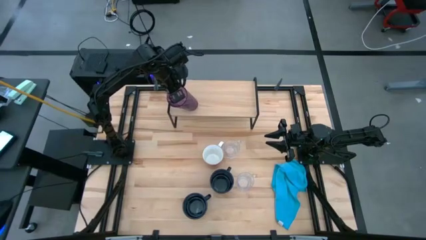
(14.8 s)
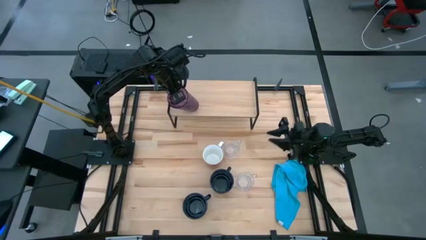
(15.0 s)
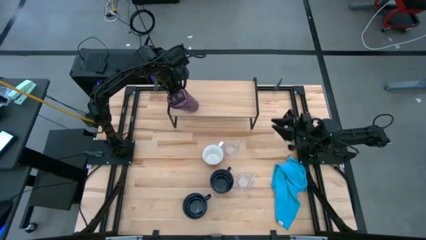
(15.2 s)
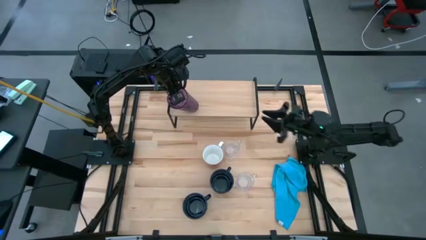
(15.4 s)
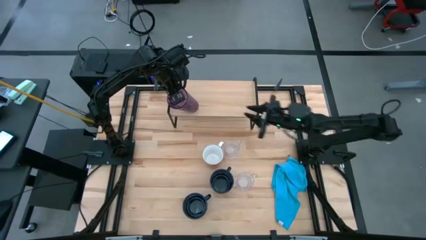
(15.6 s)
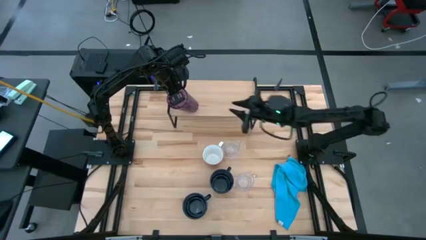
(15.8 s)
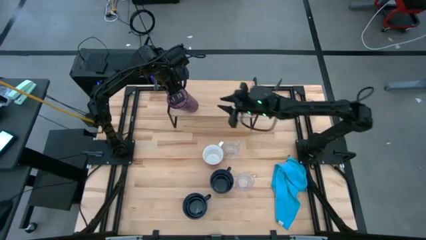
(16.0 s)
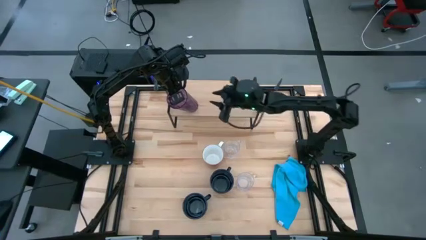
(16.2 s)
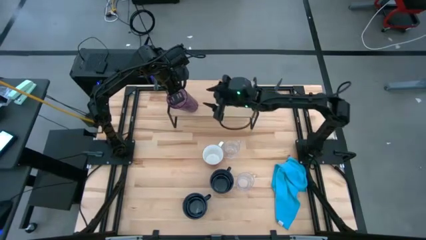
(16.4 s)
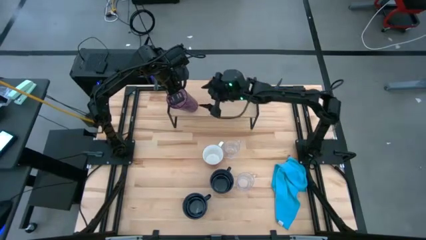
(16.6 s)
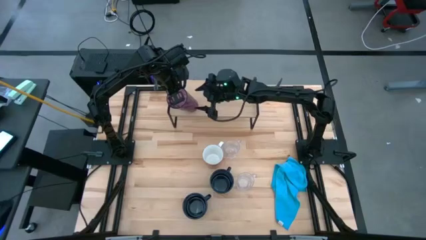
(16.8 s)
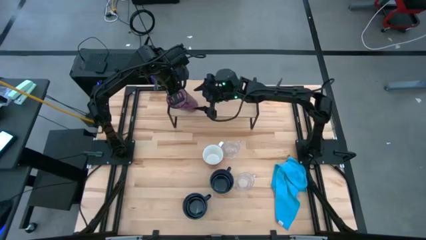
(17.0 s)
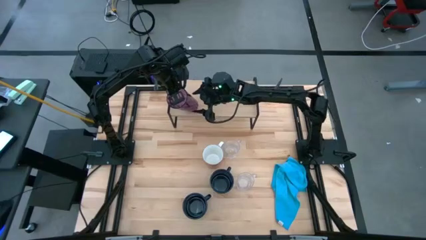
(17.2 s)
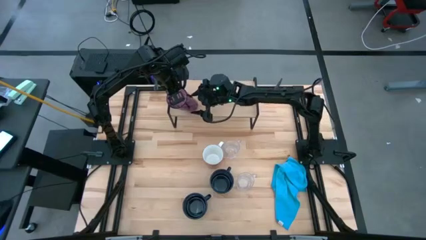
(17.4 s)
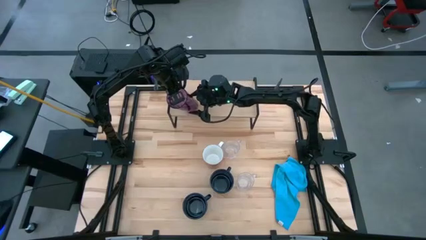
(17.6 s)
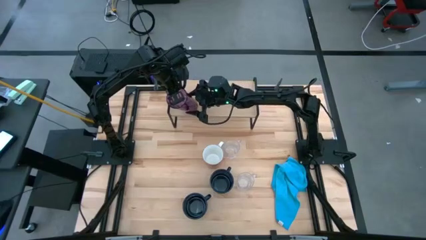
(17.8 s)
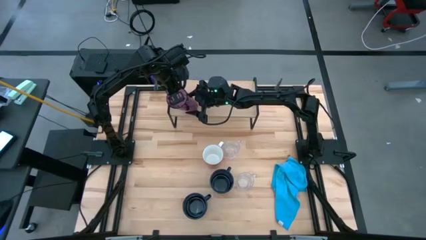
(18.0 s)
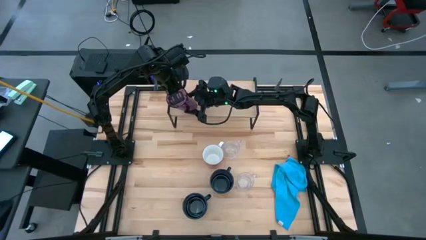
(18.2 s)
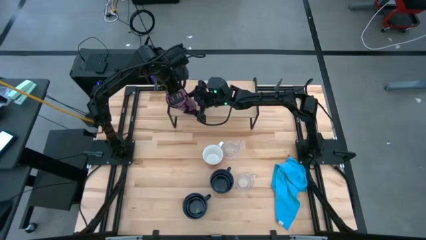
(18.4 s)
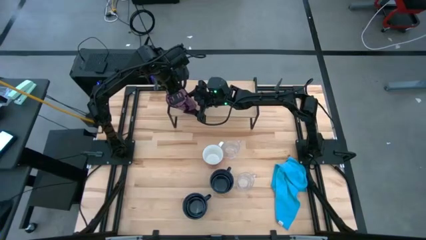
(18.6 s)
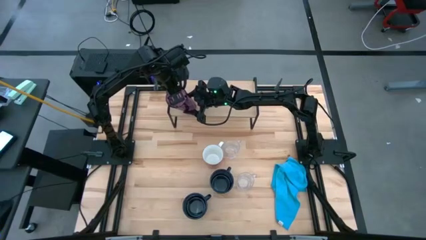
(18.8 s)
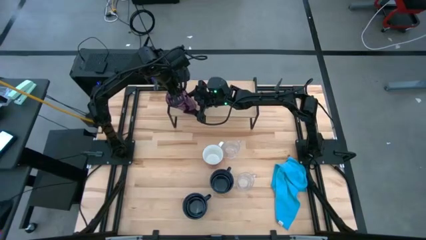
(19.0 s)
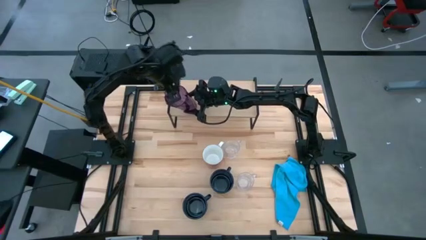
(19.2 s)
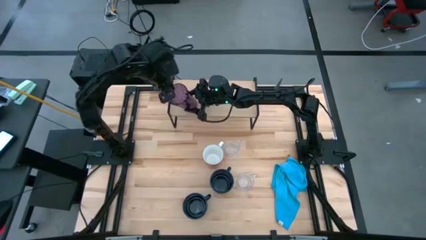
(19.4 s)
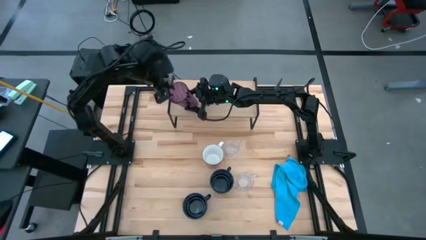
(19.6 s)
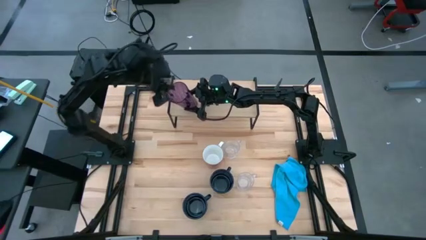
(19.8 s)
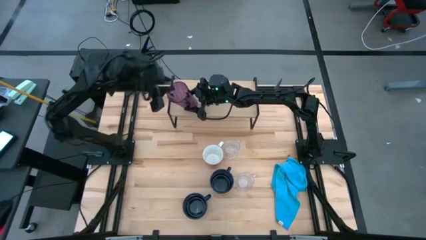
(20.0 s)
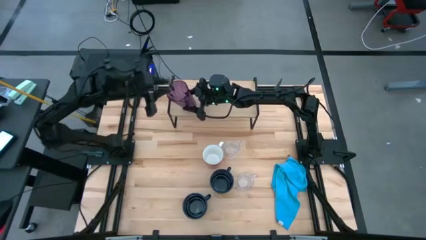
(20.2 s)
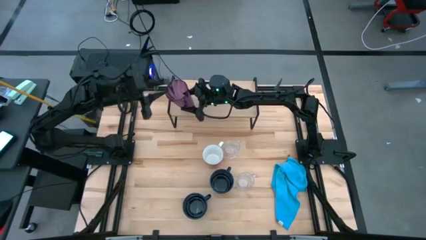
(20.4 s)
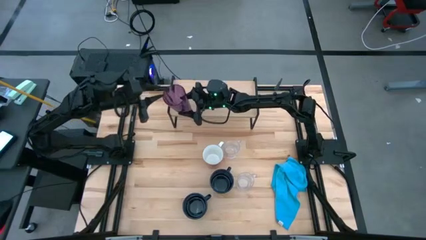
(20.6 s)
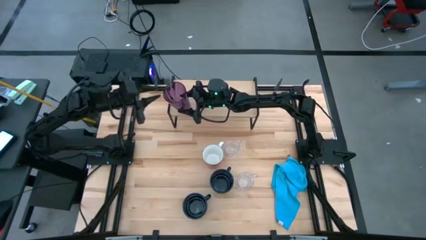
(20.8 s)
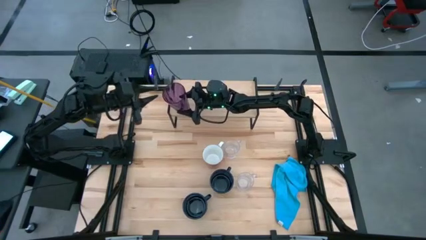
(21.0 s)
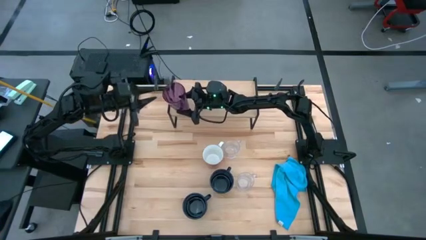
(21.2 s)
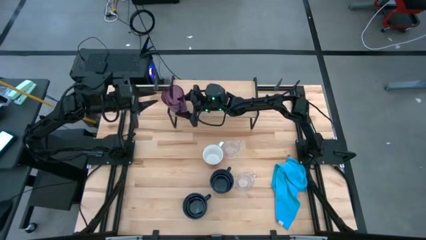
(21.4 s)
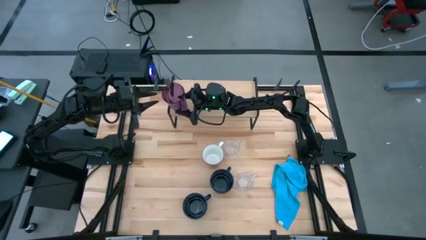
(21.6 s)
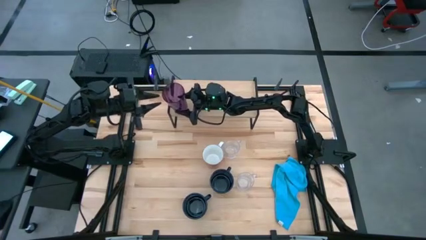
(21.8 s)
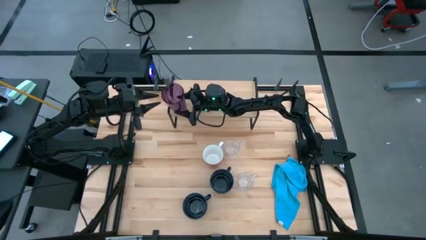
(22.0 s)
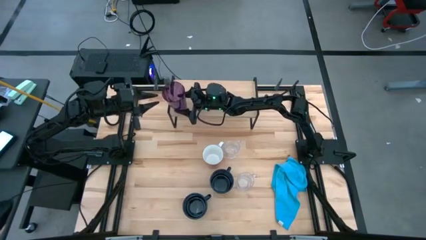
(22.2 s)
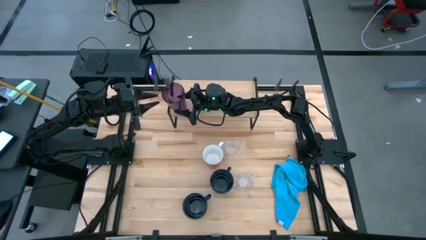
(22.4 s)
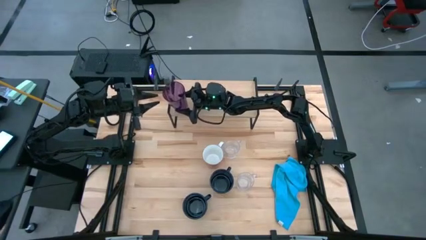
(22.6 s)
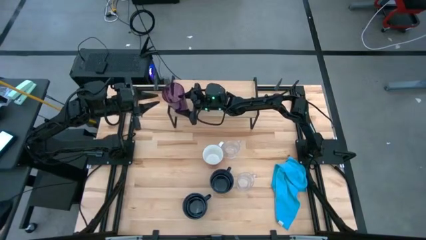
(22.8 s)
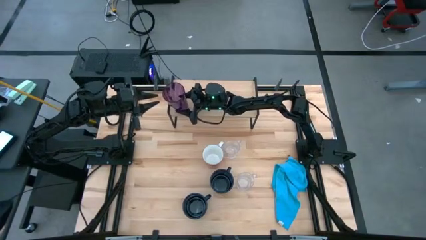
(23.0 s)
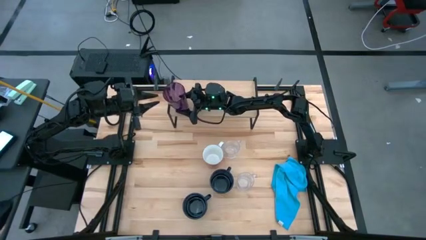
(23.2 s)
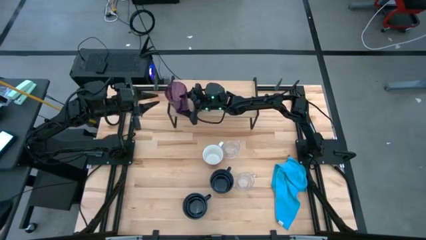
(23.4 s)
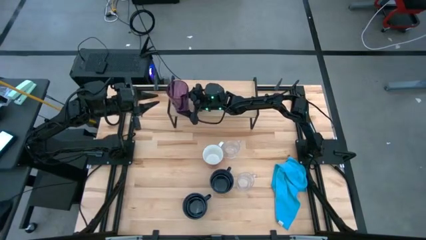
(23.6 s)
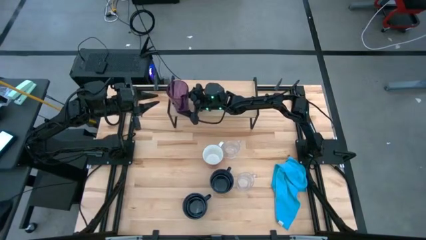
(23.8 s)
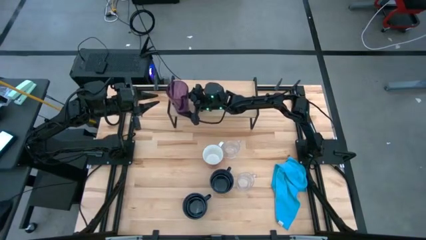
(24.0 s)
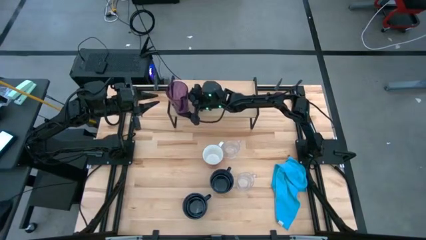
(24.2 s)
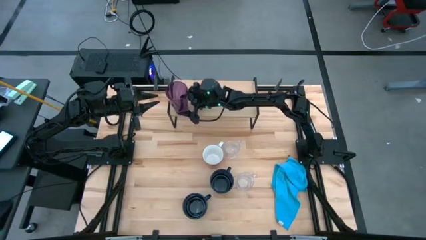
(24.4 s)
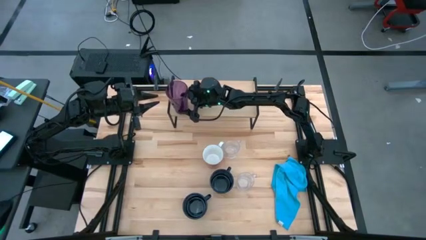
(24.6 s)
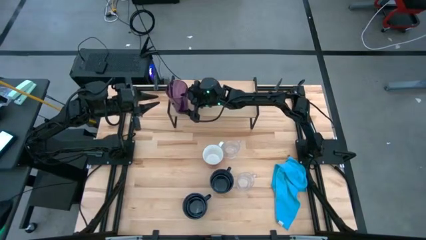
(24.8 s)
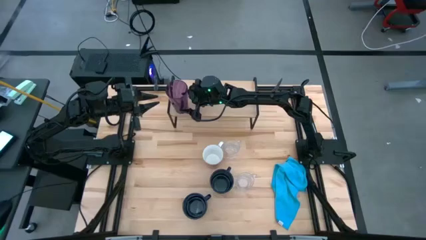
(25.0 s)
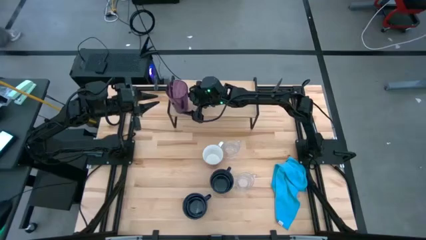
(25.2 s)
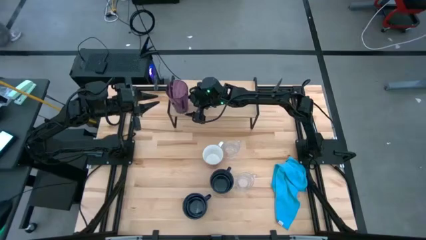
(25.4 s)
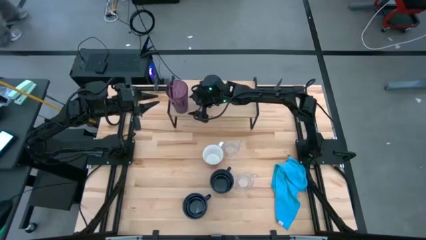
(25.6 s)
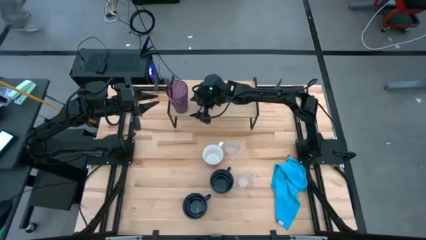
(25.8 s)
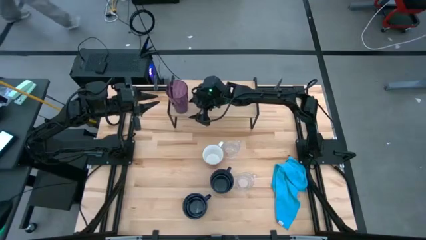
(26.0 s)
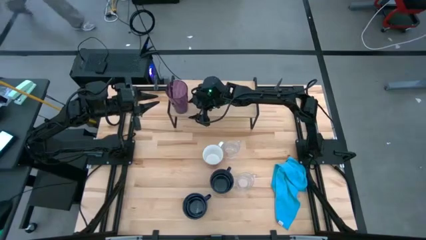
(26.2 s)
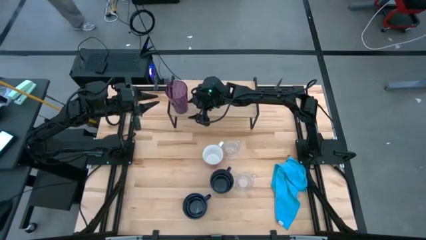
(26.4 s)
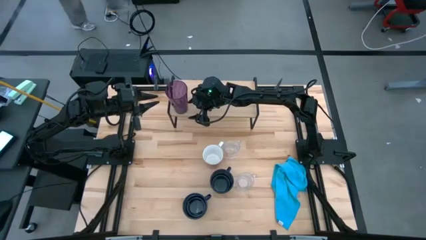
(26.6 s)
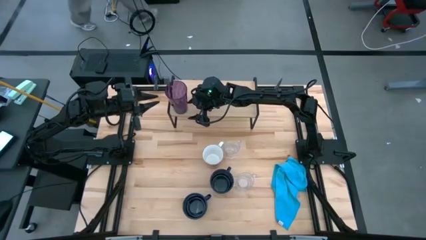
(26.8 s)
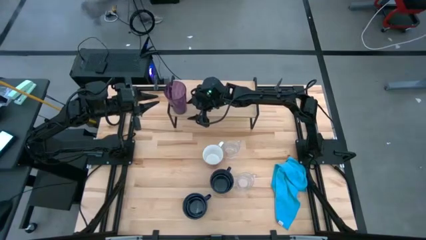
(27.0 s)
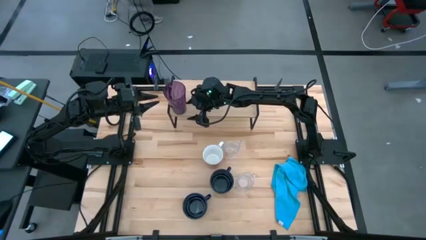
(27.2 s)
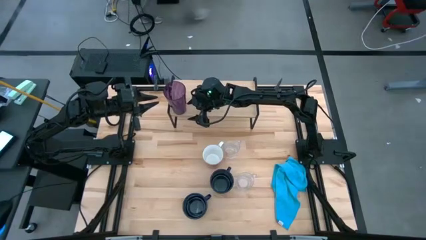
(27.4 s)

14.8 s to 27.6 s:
Task: Stack small to large cups/mugs on shelf
Put the violet cup on the shelf

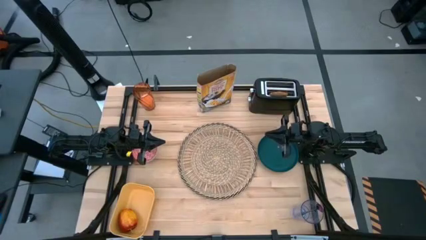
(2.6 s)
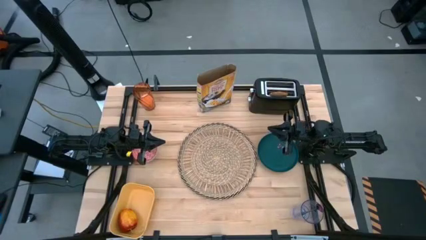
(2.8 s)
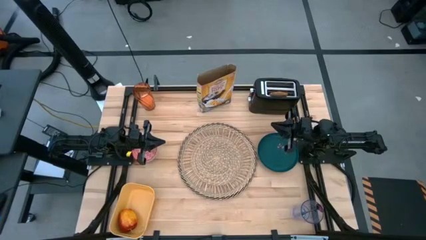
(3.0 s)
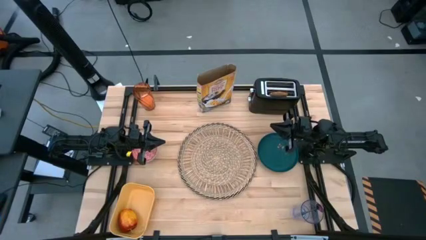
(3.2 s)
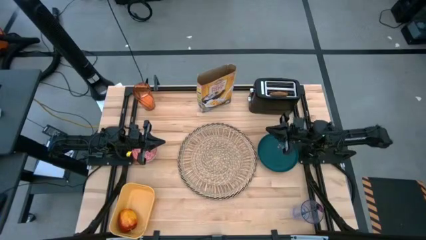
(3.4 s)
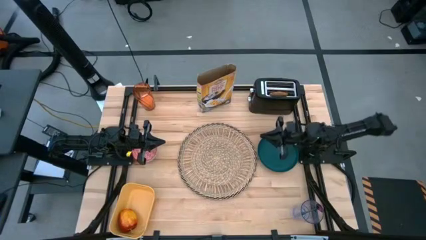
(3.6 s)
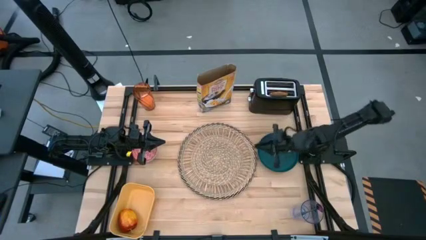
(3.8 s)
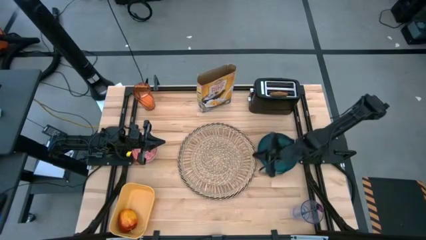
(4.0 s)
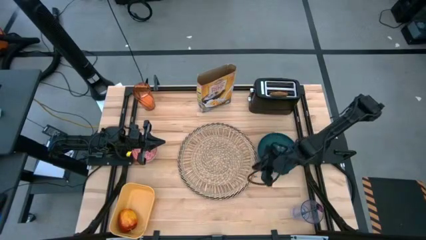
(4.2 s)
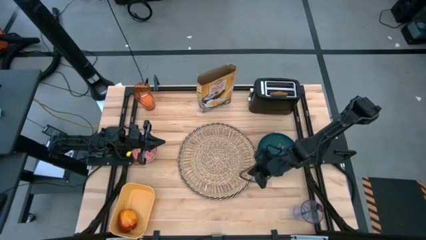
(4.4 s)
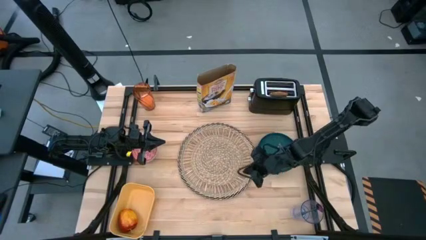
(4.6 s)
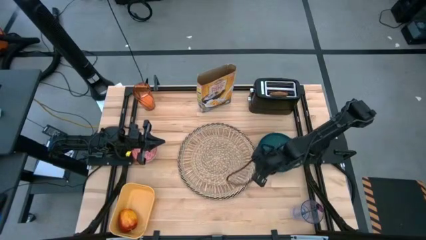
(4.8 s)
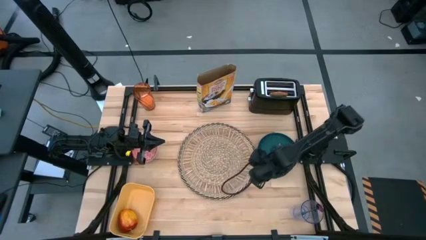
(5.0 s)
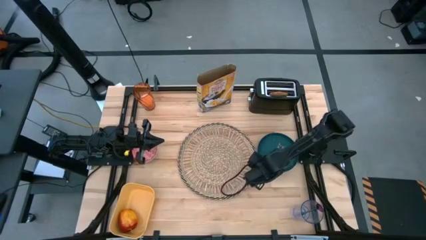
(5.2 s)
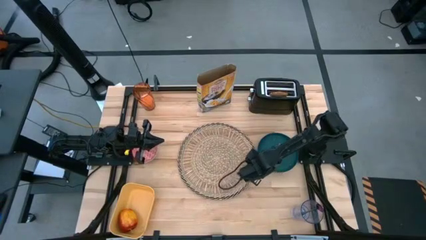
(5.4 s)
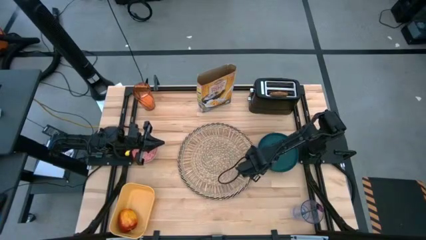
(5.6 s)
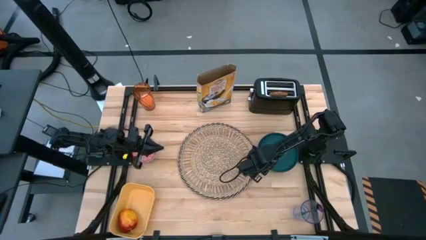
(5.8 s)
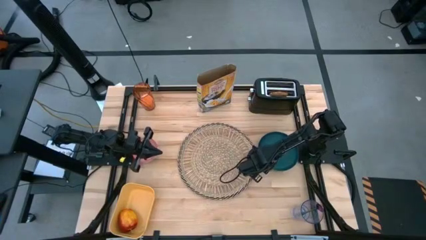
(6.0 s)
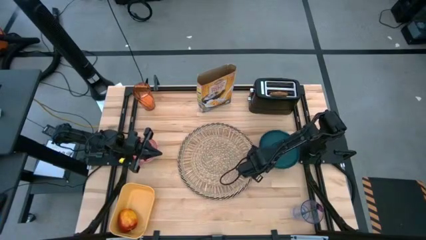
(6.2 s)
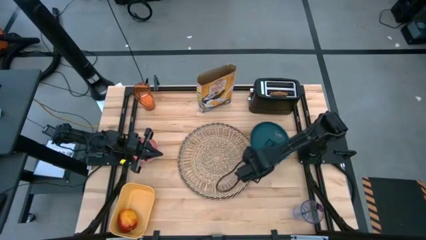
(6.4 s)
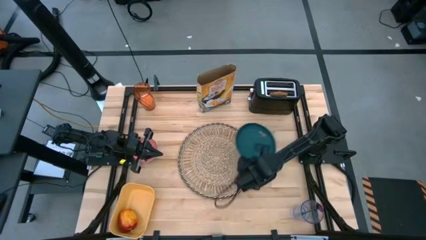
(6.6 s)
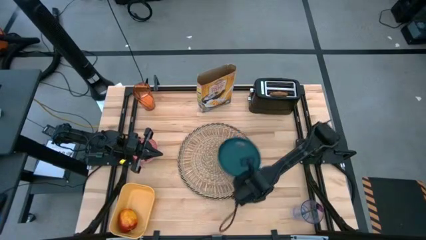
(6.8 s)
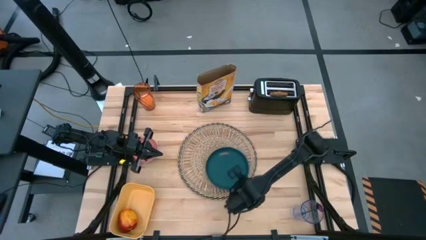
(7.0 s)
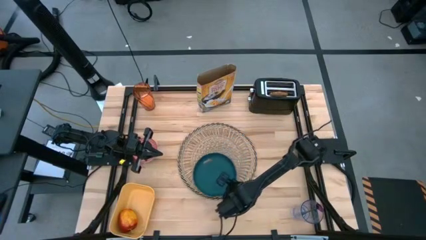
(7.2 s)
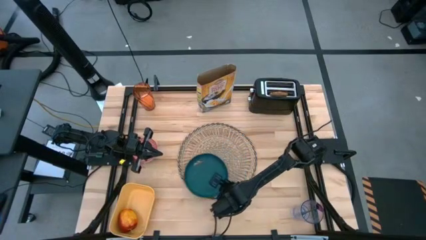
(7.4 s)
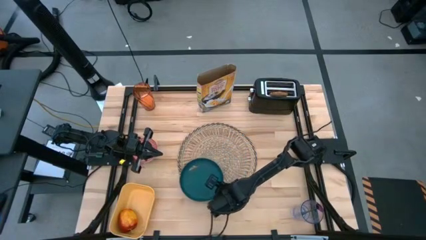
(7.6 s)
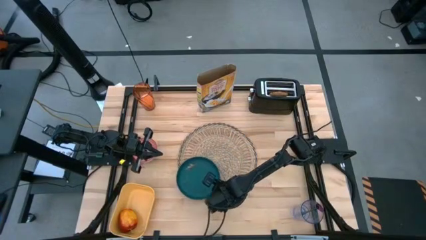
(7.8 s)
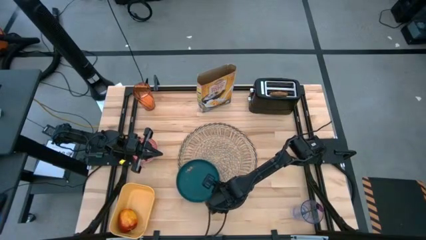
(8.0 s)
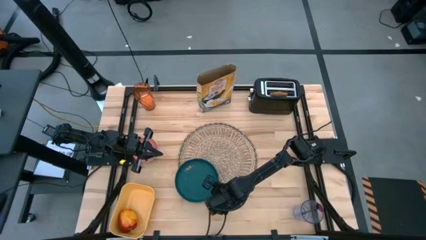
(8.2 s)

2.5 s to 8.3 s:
Task: Arrange a breakfast setting
Put the green plate on the brown table mat
